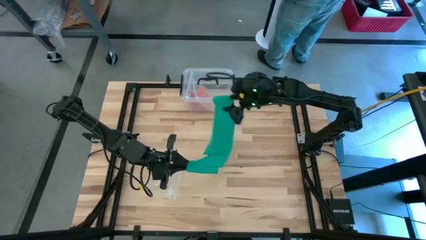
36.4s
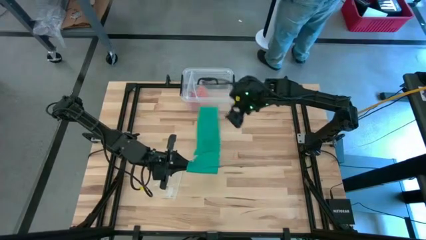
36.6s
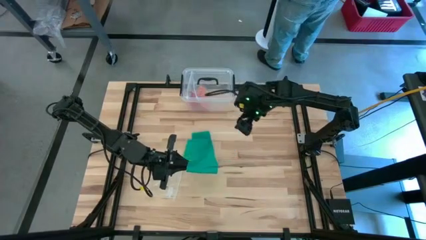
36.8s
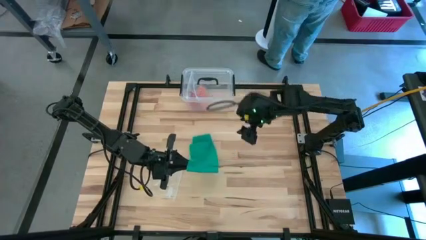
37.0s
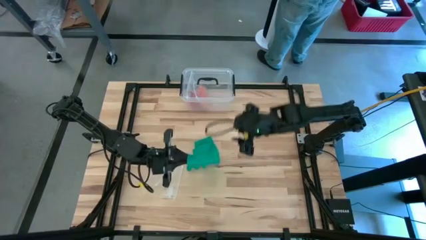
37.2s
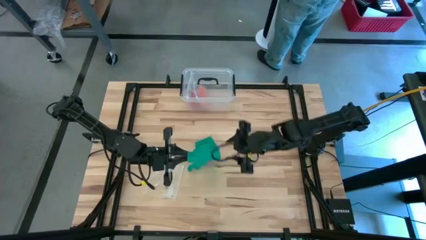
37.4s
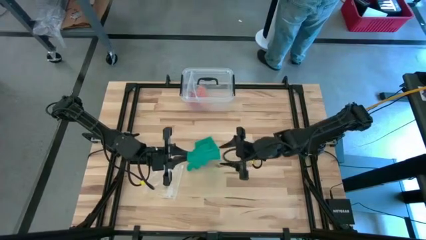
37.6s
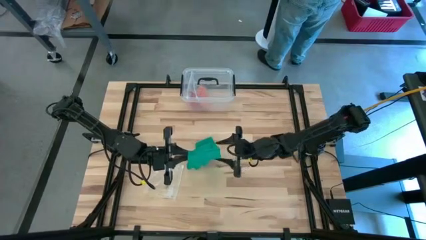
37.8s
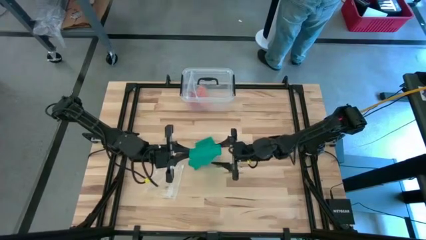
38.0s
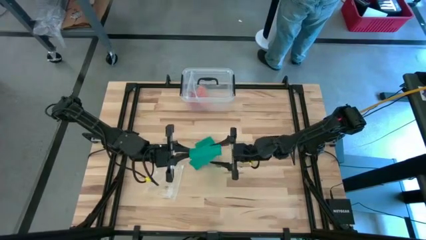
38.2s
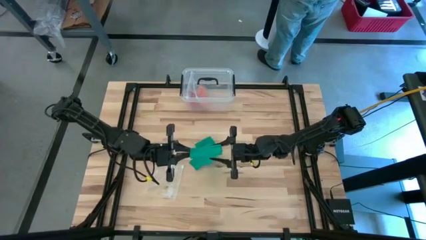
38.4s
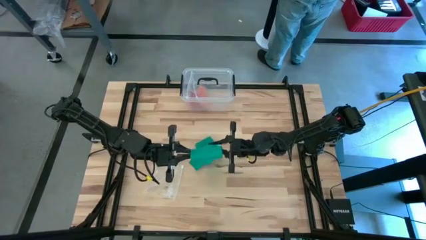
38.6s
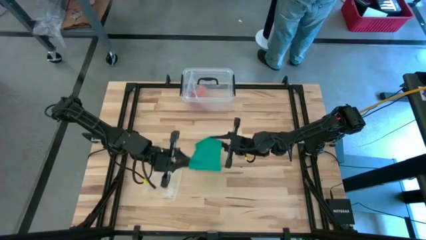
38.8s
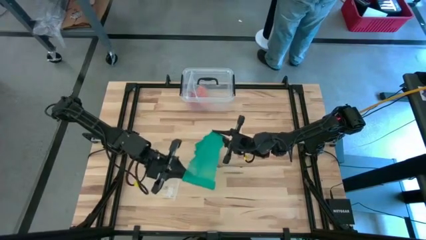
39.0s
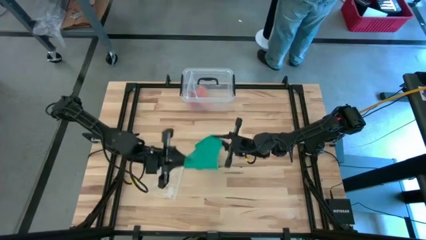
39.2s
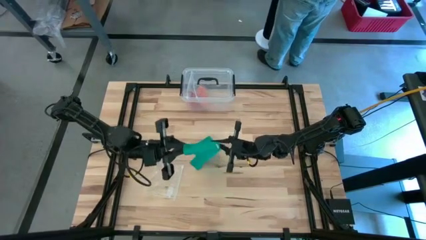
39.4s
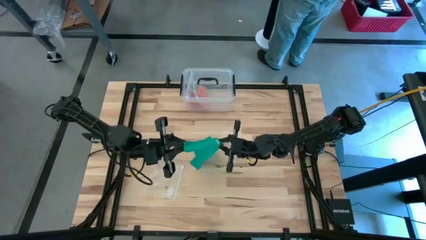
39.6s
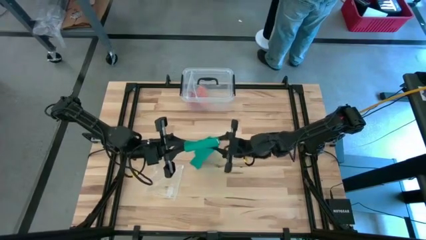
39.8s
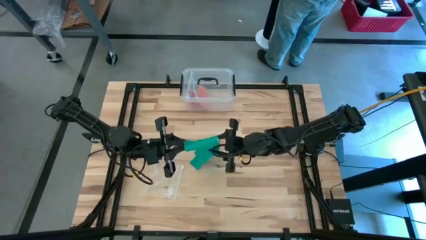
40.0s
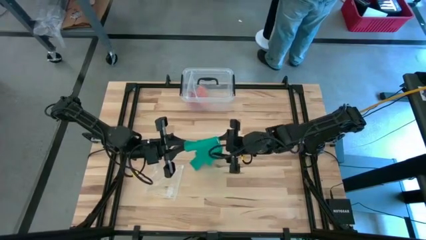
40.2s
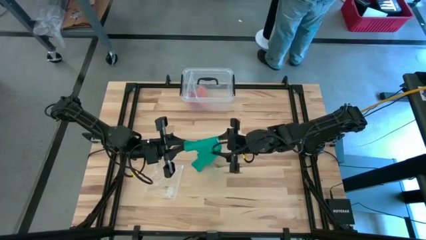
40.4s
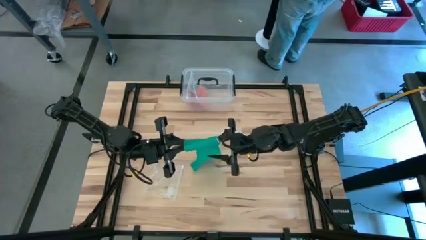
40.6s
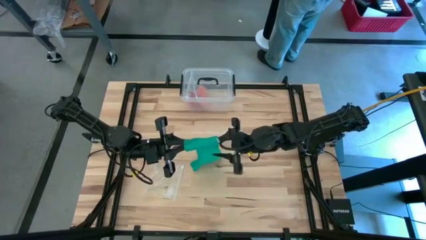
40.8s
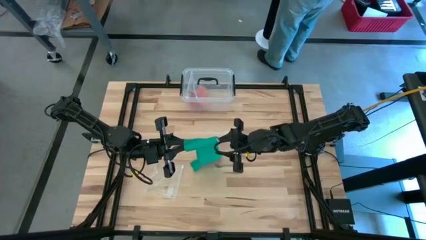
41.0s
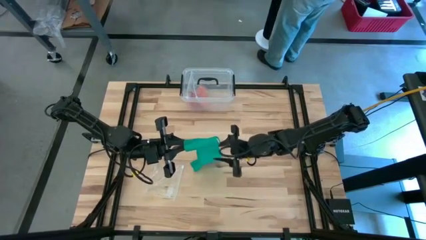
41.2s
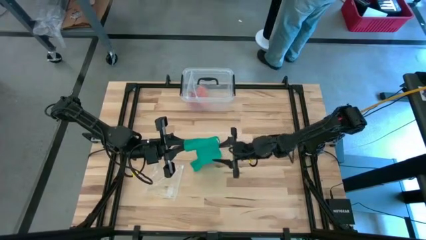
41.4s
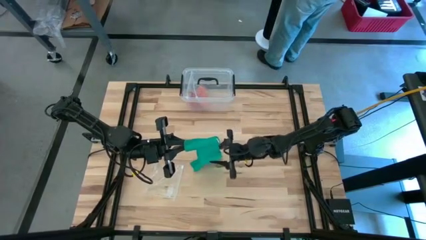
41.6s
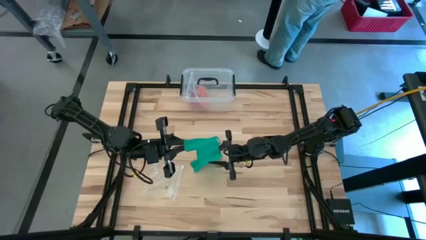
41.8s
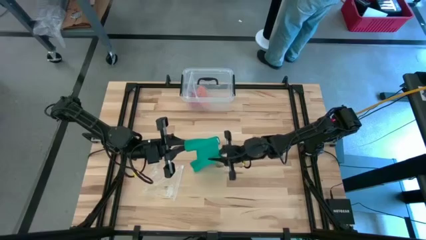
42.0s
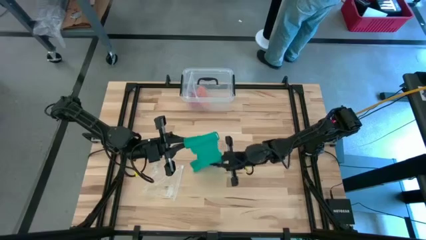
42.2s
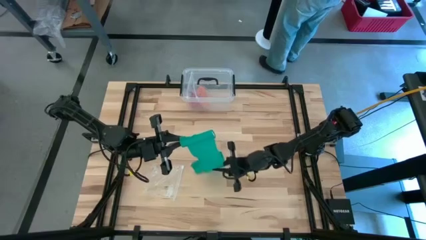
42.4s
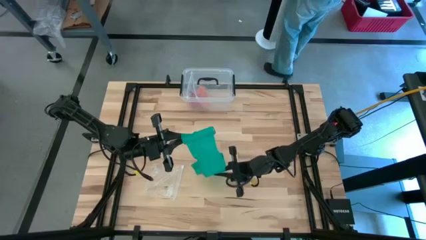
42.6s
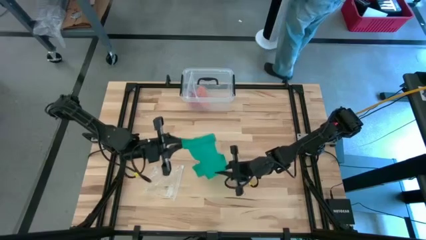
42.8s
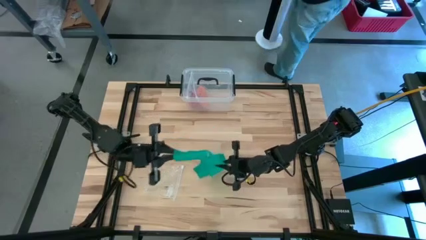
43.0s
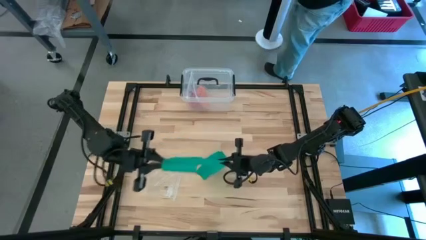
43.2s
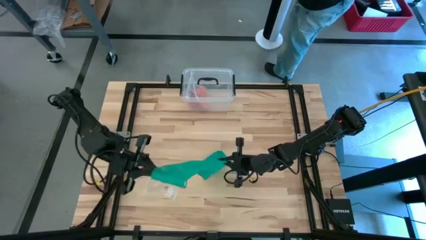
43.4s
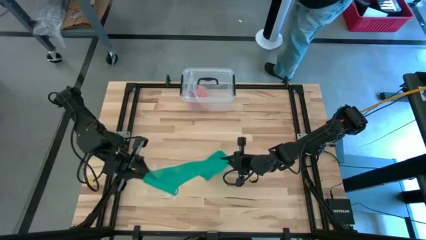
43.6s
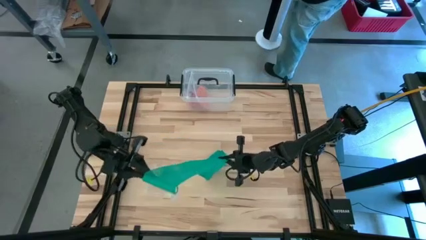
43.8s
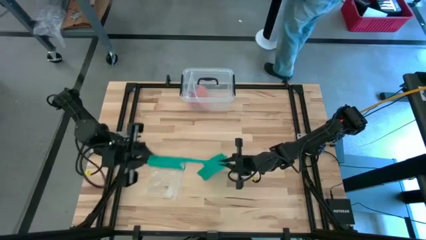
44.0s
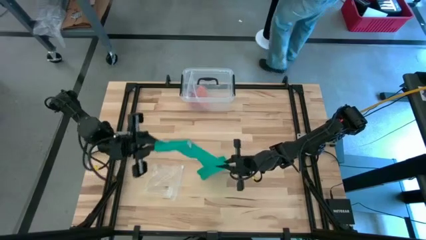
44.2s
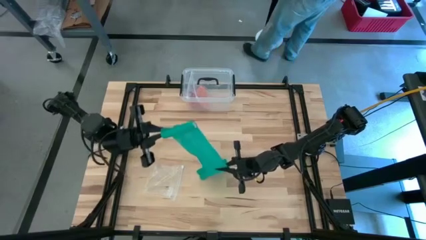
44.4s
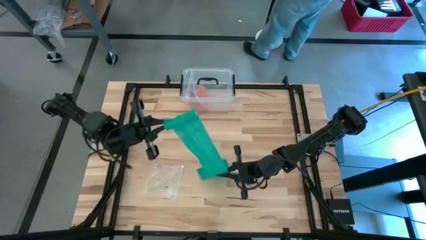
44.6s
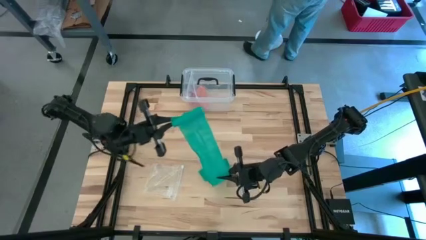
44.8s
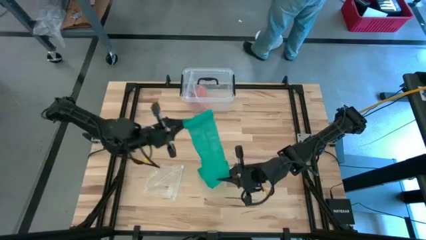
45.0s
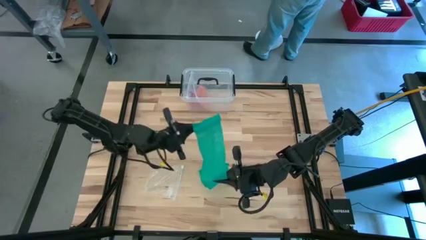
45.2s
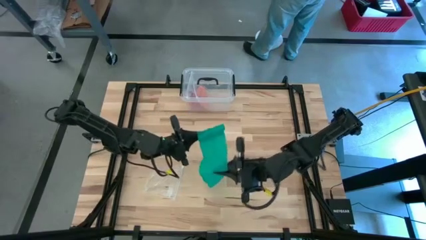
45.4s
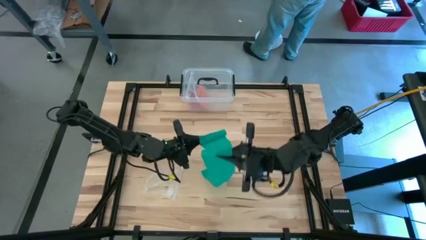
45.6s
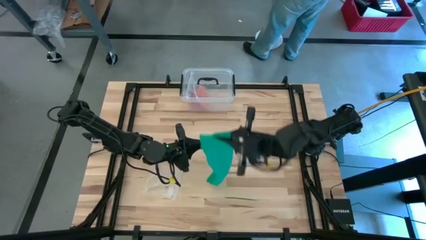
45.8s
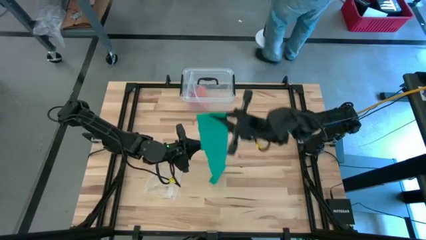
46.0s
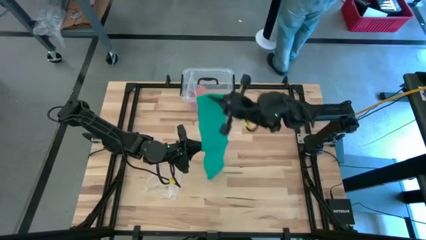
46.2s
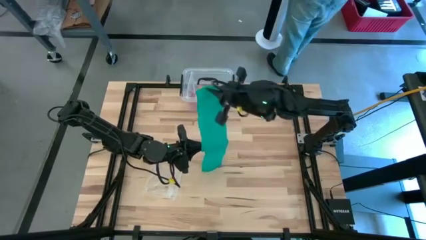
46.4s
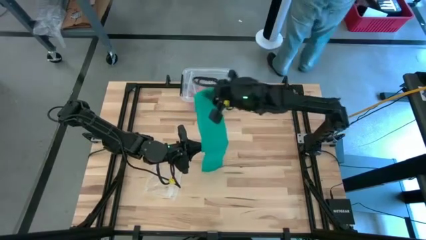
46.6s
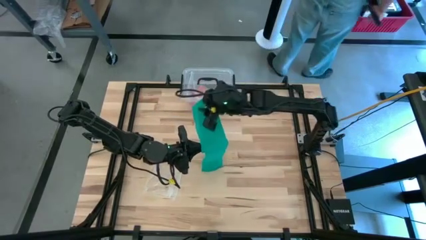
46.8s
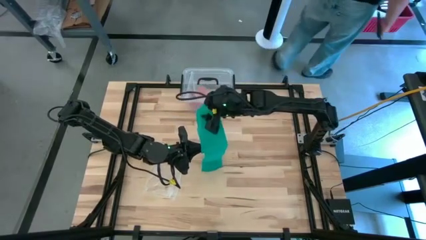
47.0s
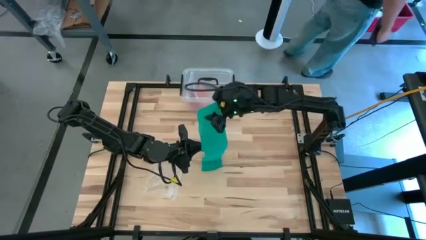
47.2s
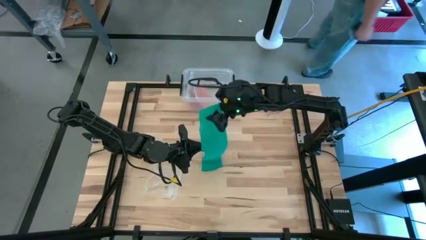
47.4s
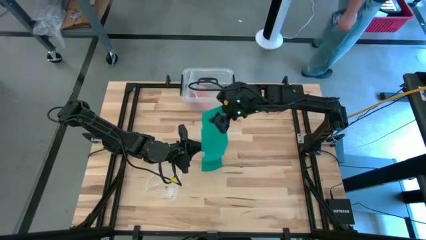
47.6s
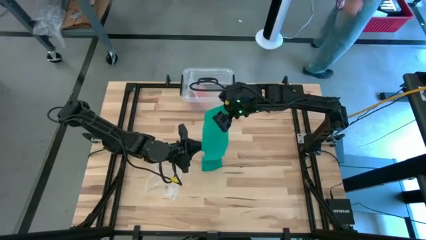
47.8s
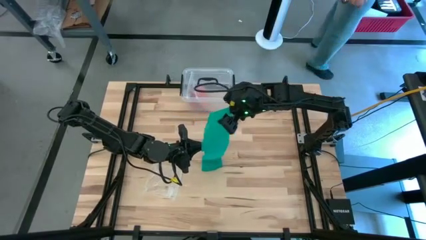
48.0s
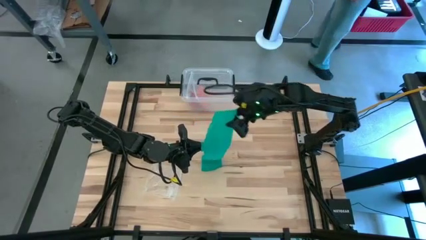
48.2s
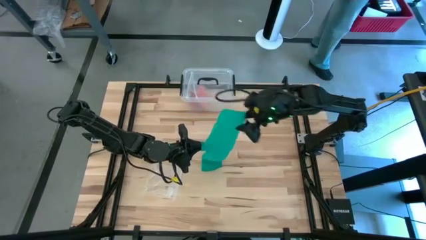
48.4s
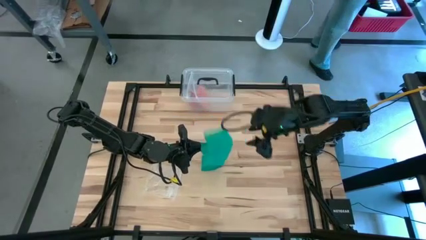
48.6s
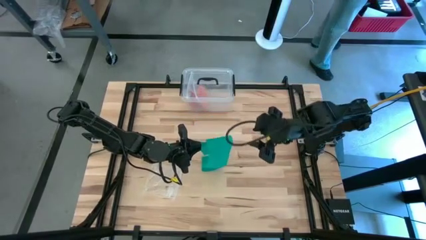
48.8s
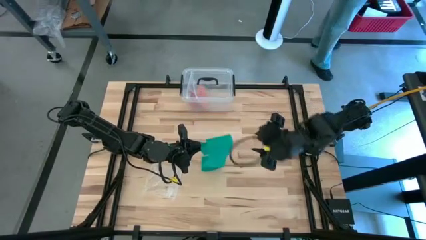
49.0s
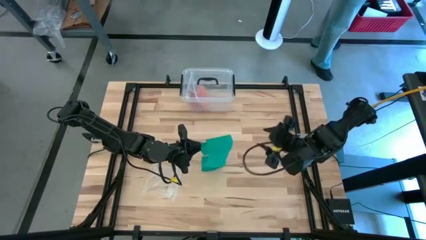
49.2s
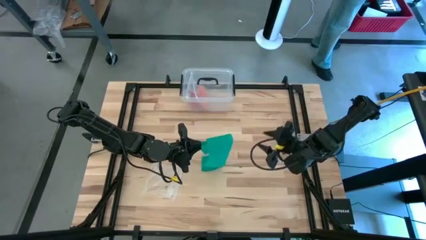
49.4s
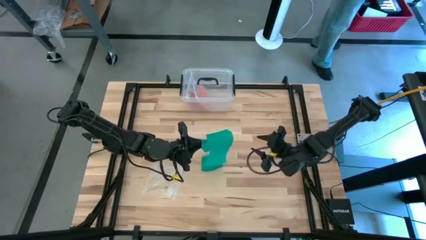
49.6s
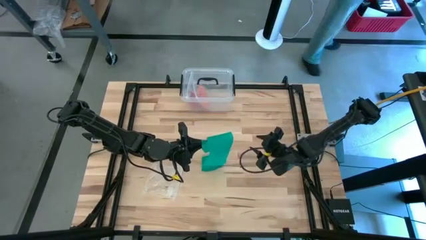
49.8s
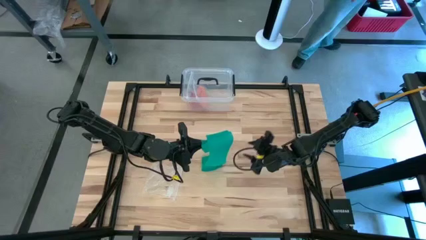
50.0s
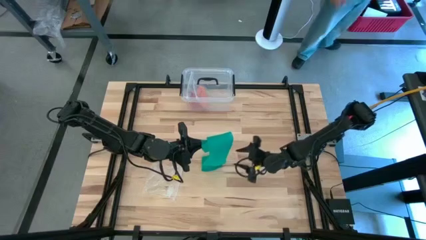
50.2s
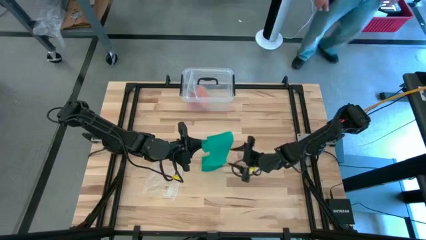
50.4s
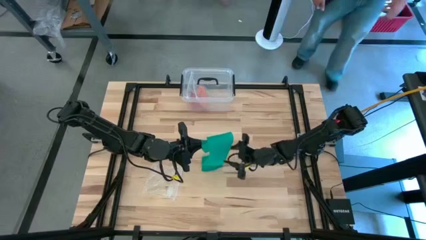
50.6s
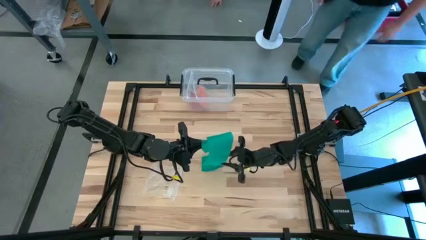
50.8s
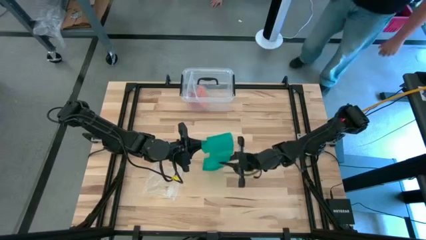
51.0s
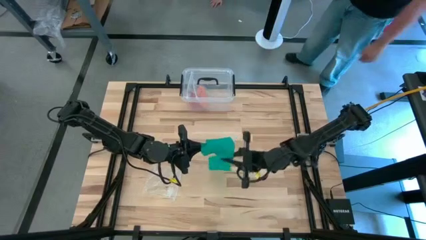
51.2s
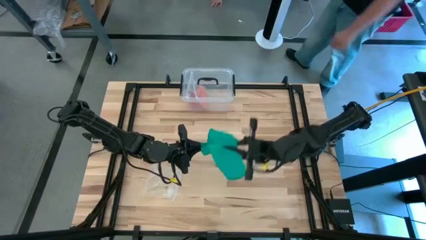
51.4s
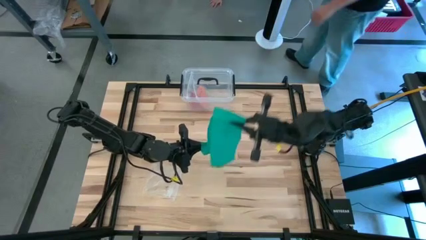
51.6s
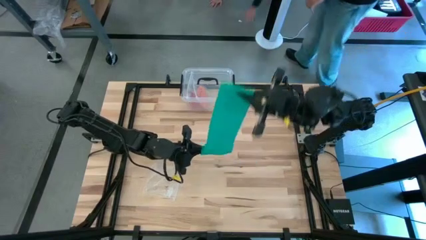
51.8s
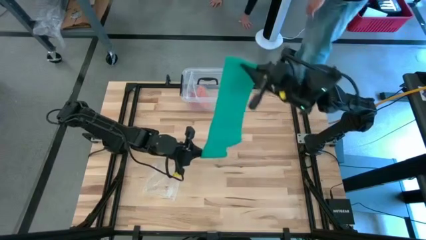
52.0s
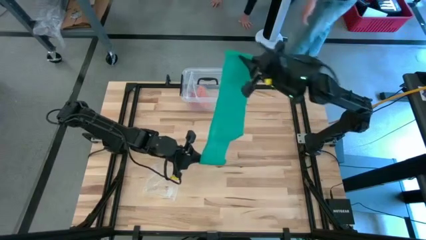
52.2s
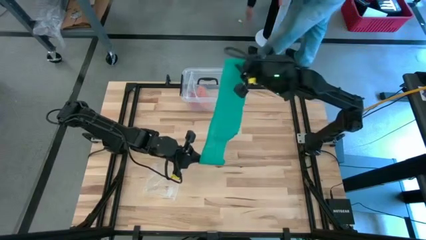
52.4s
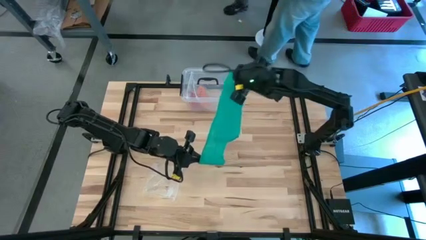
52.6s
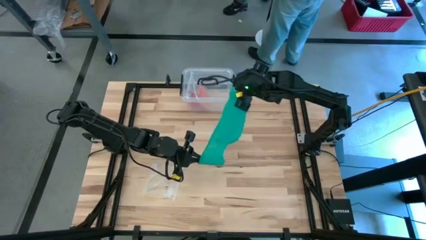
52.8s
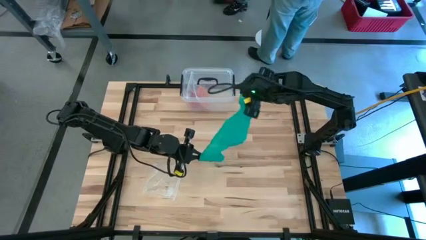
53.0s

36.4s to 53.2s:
Task: Roll bandage
Roll the green bandage
